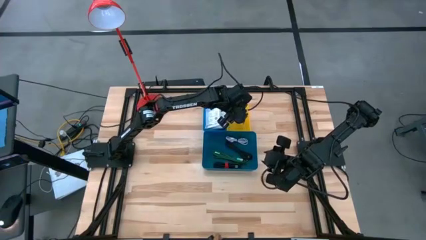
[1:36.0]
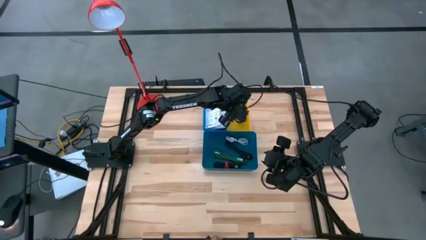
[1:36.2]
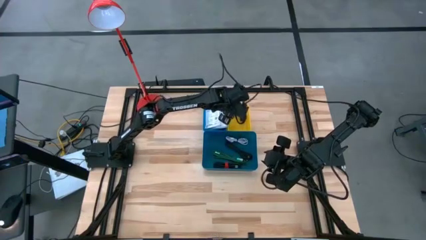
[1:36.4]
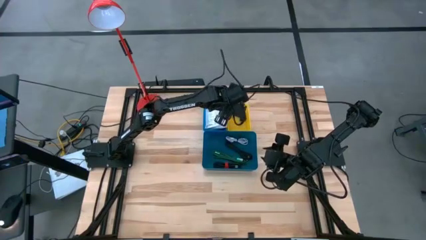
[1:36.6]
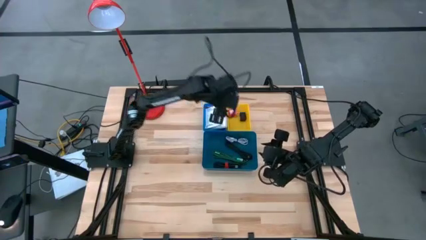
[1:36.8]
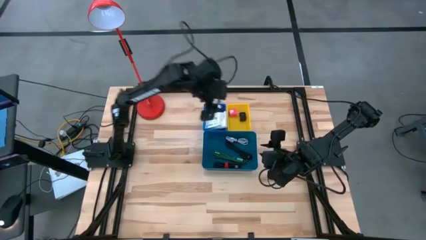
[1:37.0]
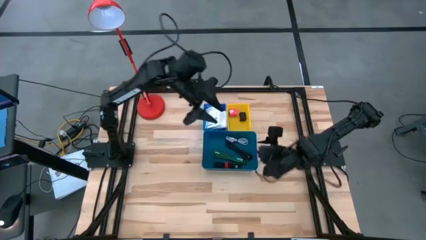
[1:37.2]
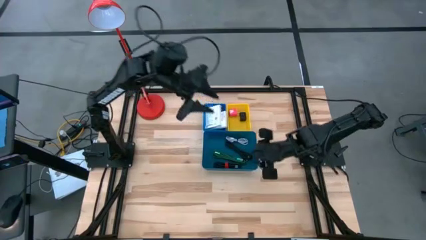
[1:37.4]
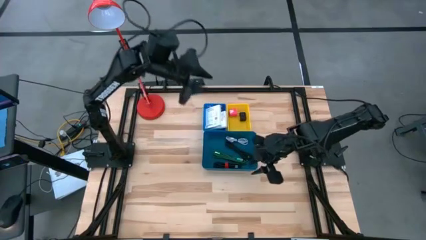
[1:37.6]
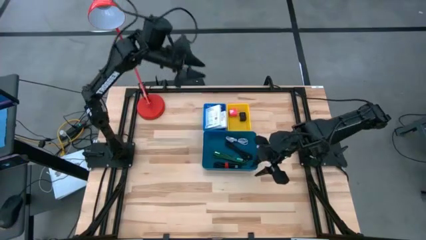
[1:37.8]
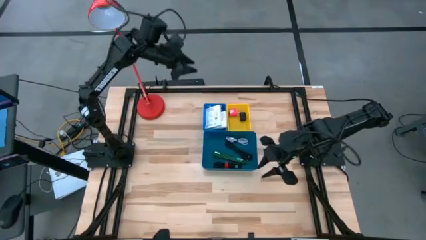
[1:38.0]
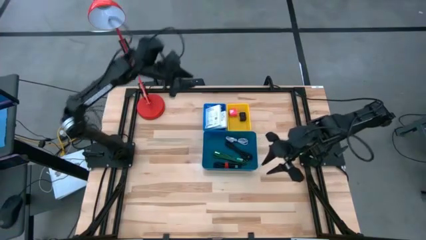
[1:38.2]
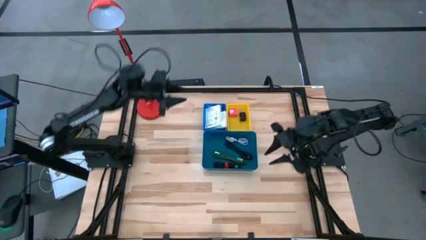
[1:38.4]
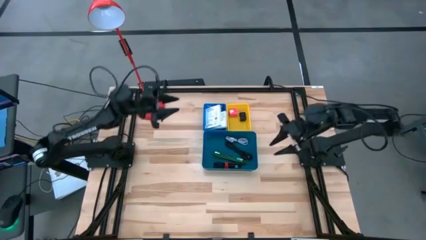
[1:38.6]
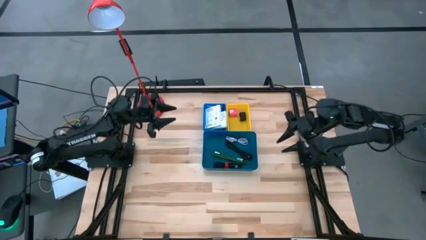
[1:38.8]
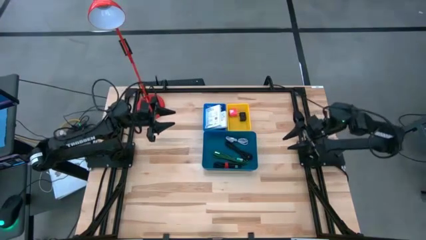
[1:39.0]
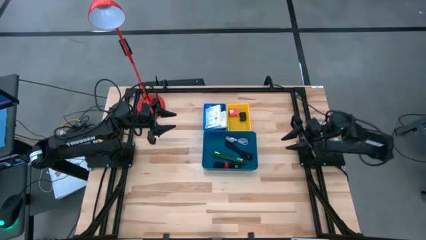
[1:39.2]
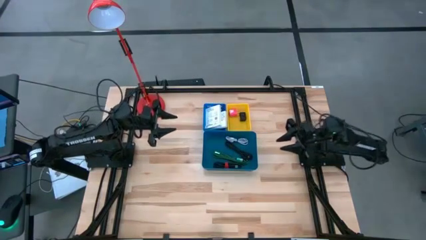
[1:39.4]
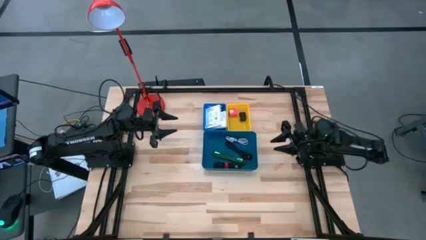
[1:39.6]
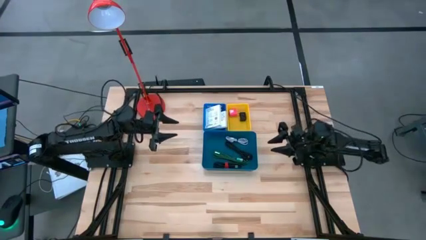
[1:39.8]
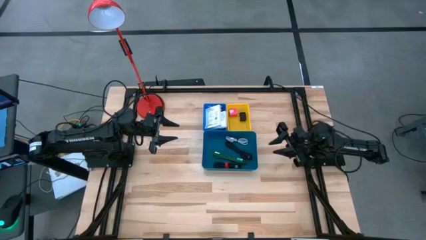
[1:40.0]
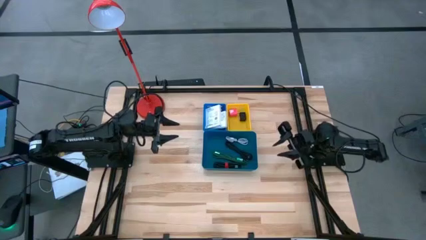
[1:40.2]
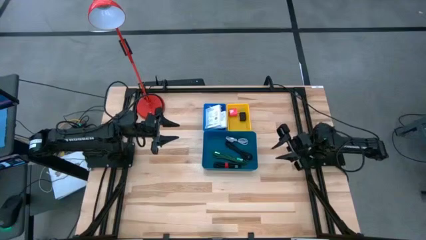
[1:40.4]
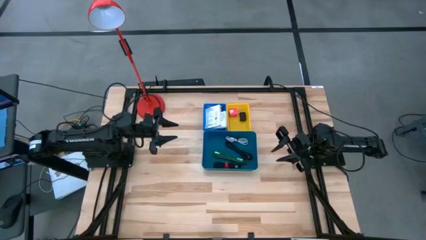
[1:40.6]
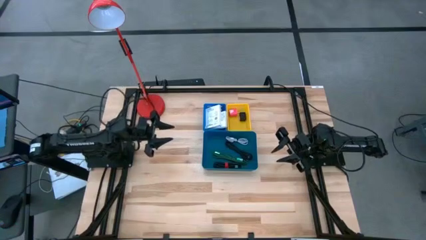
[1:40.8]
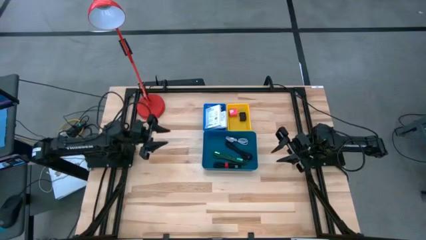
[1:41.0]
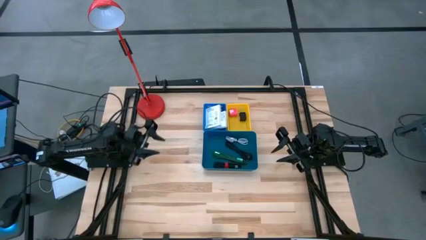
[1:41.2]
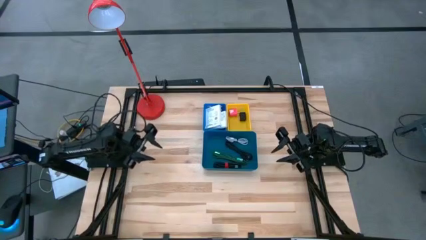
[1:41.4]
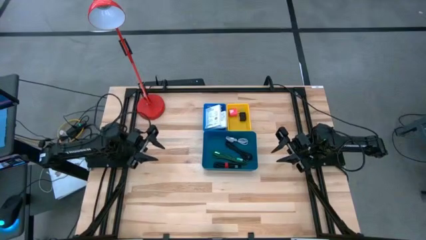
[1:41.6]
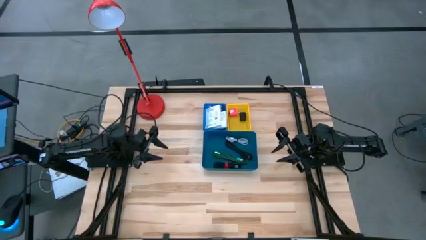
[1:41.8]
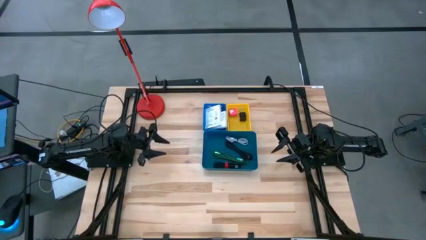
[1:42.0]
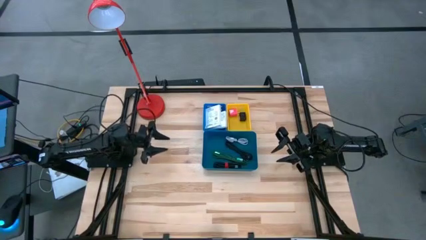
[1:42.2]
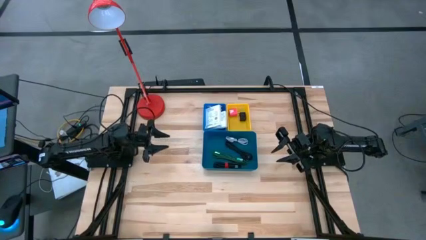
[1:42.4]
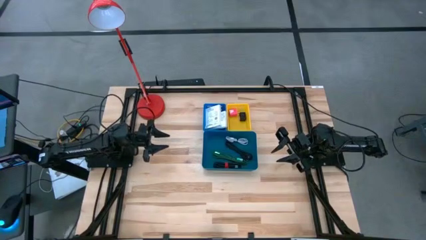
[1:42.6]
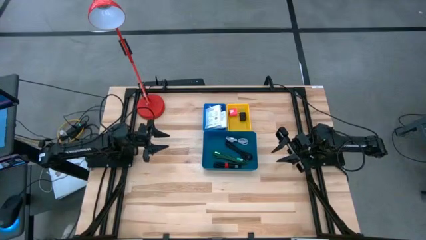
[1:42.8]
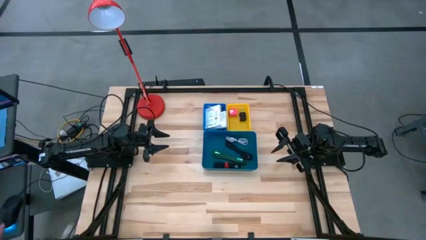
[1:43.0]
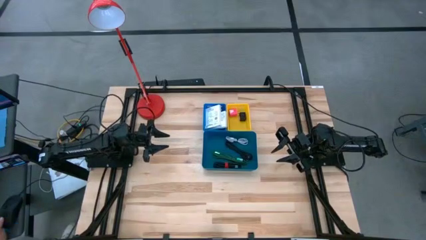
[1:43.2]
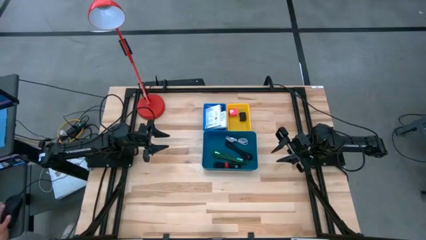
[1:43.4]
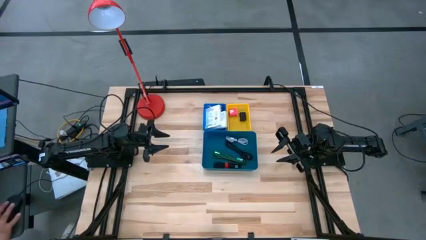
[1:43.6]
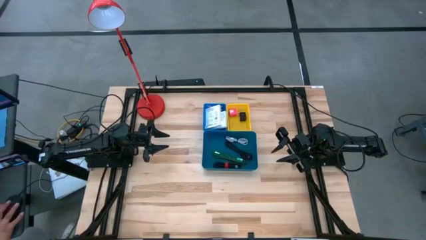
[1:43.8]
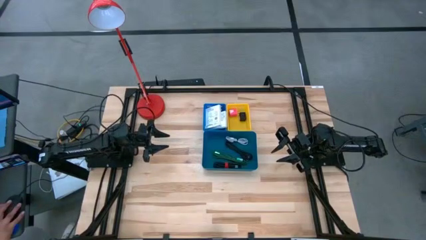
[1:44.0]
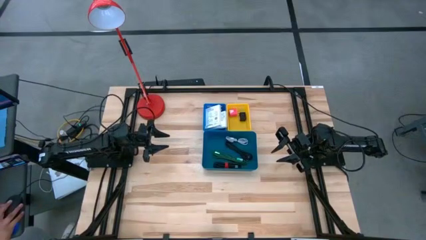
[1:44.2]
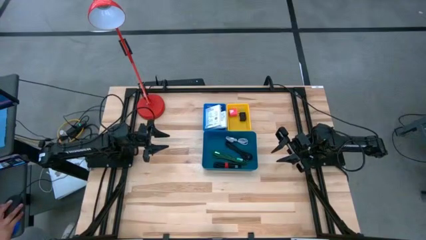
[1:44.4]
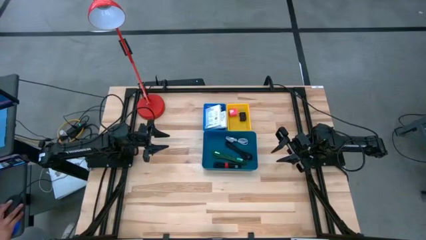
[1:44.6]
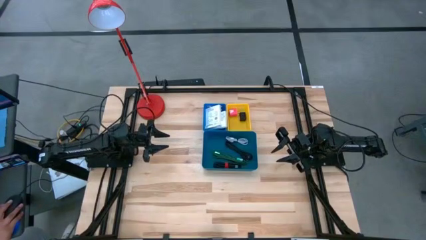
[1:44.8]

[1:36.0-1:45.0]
Task: Pick and place items into bin
Return to Home Position

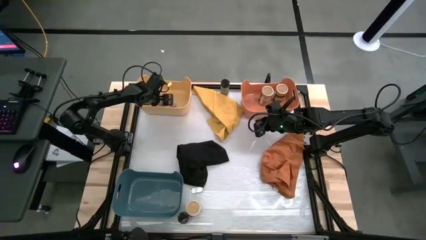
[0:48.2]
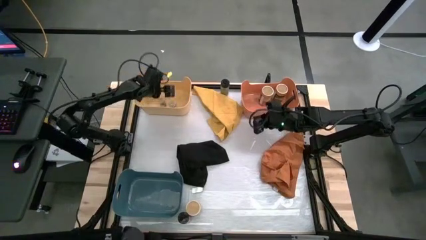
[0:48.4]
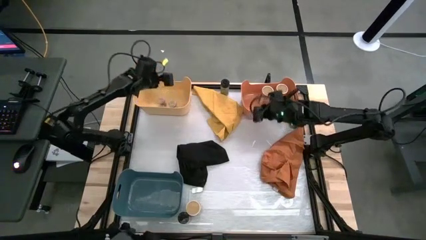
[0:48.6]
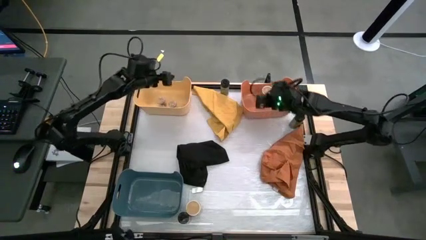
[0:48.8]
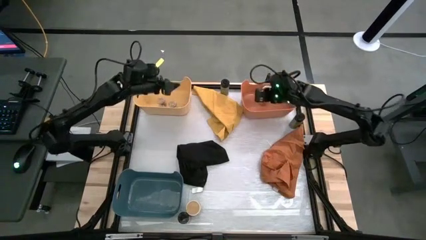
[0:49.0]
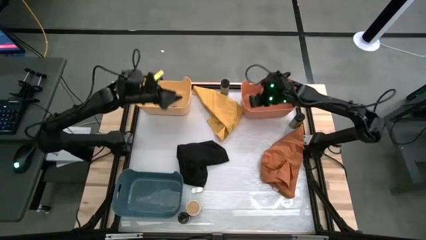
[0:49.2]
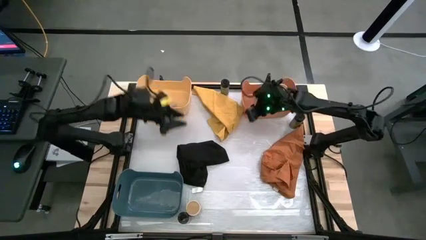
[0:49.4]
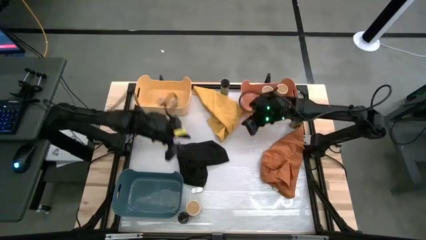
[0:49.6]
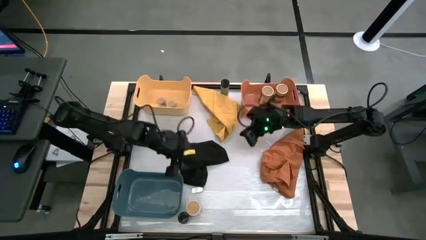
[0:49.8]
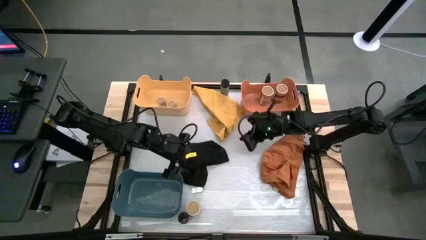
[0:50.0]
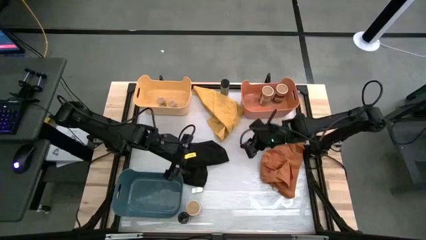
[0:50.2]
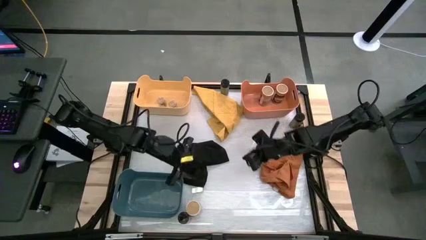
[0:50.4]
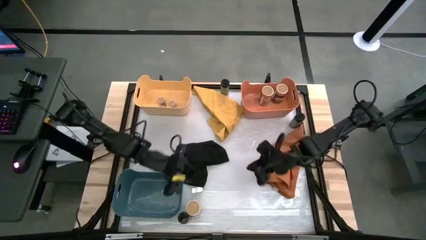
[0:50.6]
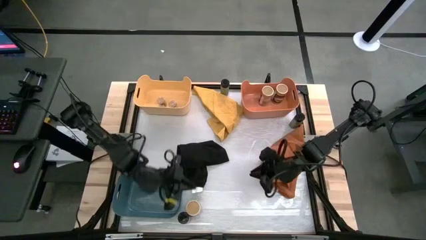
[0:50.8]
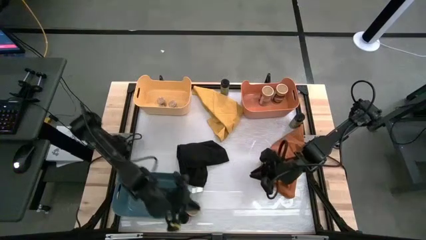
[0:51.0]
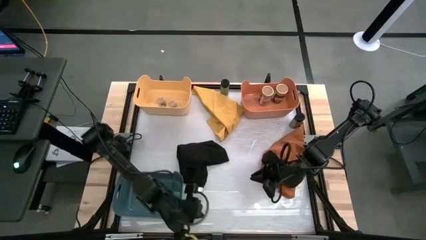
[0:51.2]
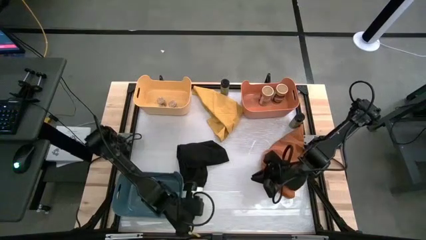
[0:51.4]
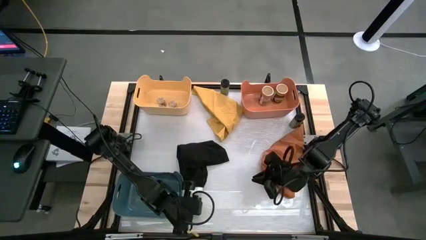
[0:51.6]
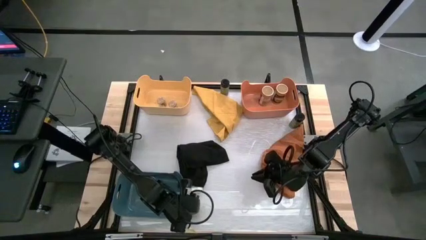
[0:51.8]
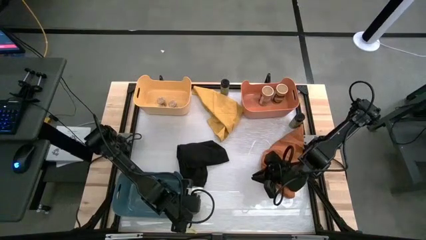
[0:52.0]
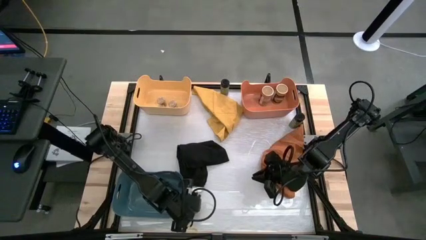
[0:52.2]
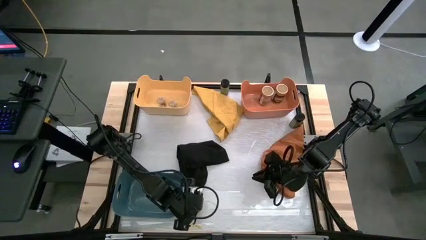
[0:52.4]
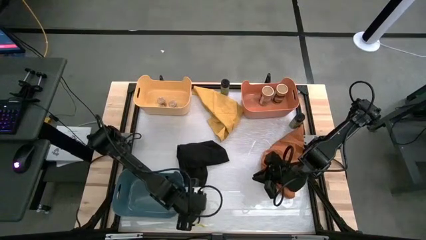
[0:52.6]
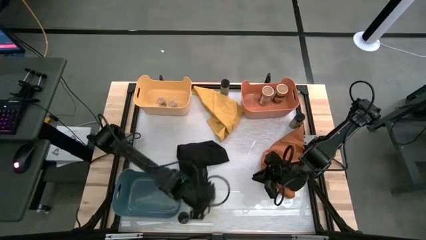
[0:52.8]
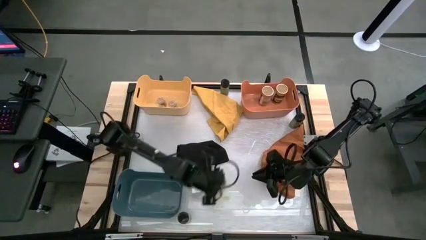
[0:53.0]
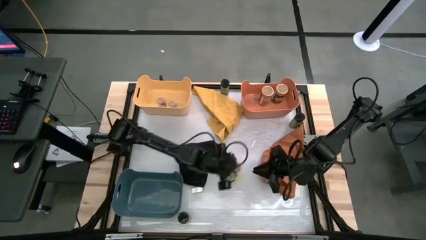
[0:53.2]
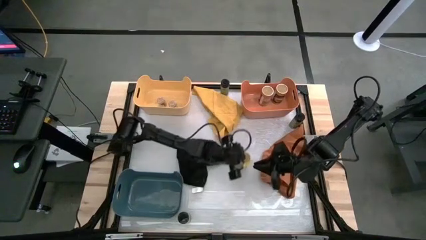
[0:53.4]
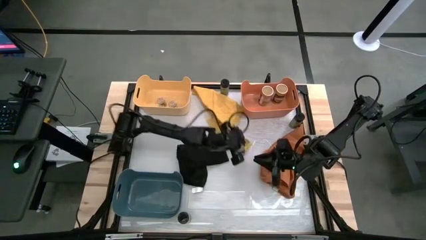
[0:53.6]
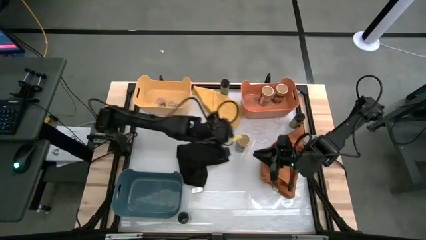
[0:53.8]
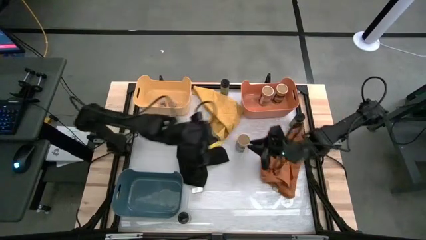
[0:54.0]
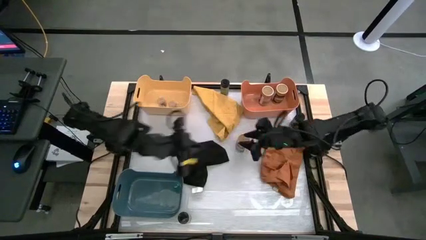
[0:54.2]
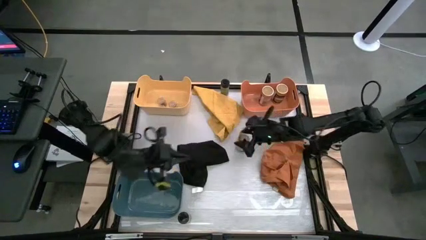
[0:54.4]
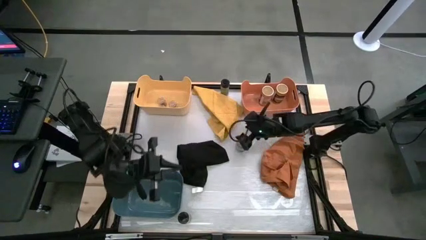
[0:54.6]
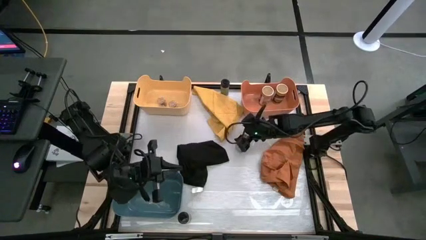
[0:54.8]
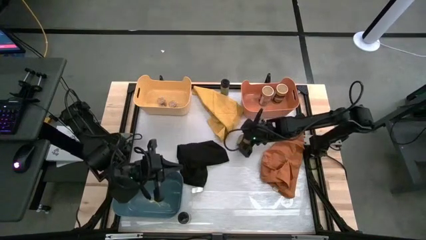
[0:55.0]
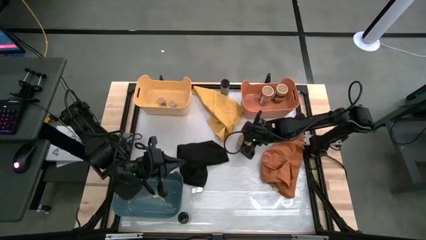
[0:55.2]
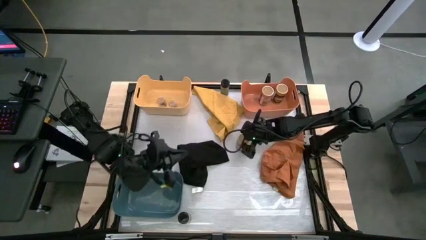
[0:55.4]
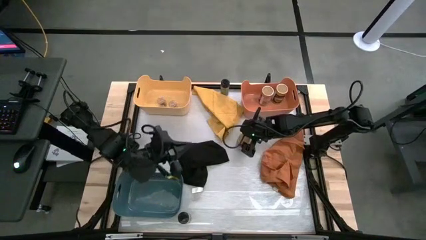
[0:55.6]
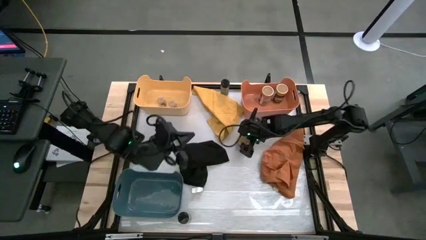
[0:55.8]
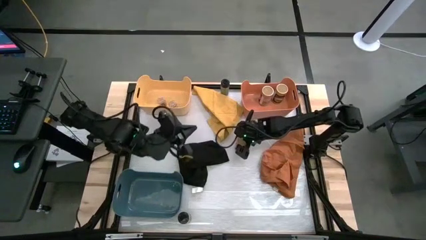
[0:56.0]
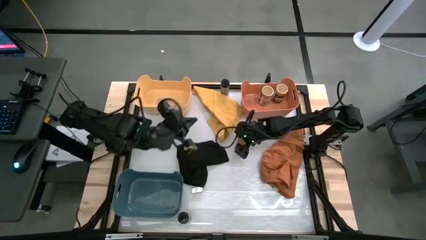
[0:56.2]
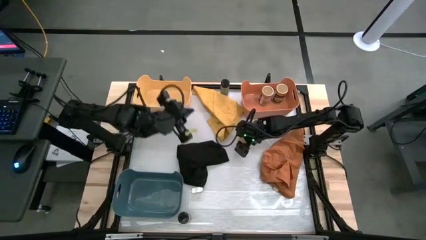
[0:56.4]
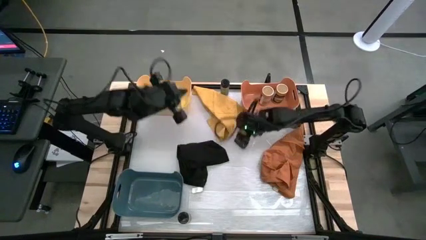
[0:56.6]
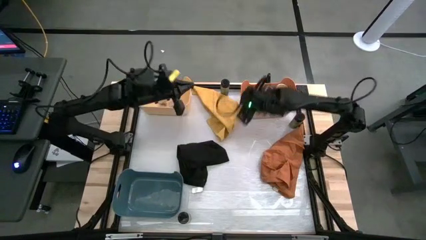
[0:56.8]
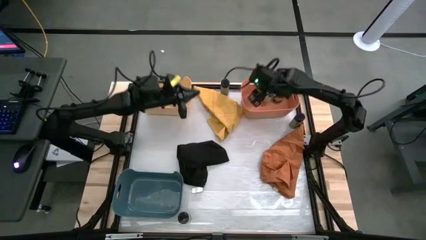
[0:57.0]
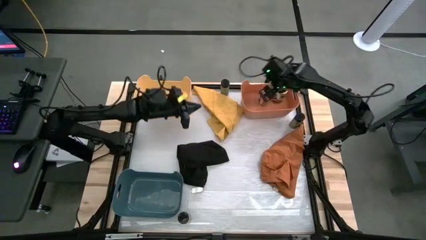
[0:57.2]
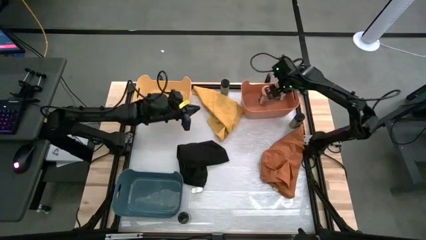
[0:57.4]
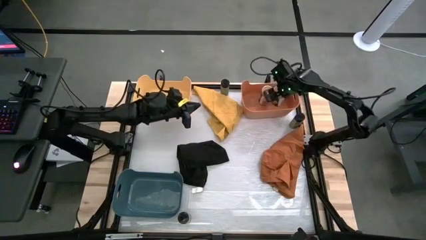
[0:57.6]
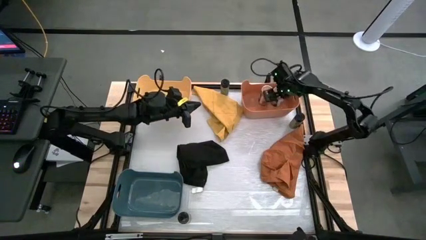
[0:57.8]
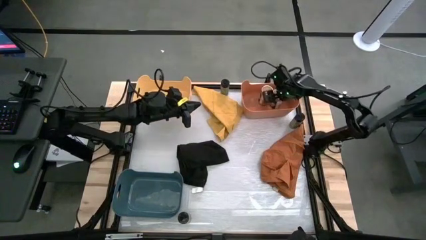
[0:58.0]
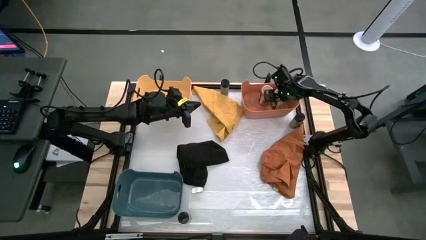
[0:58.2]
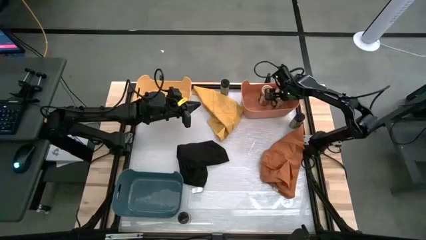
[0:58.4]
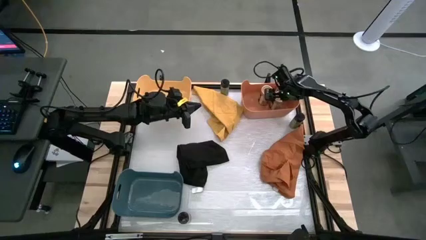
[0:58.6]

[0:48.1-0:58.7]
Task: Sort spices by type
Put the gold seasoning bottle into the orange bin
